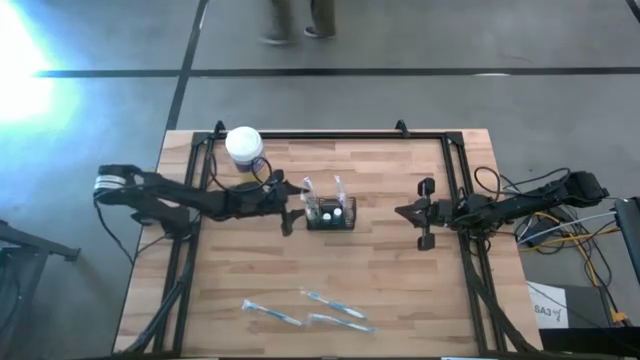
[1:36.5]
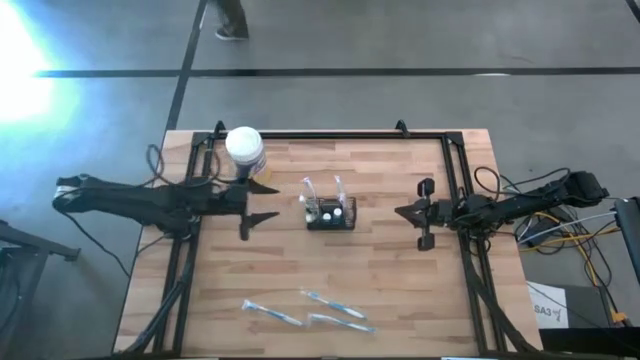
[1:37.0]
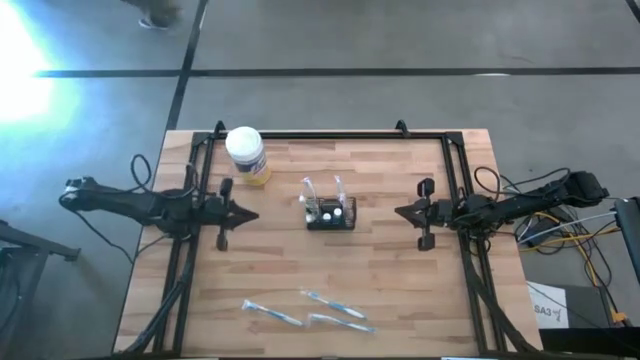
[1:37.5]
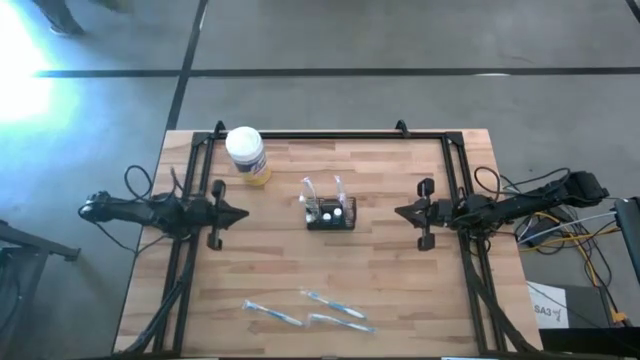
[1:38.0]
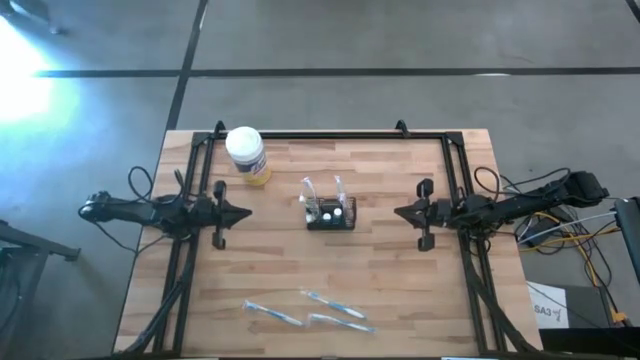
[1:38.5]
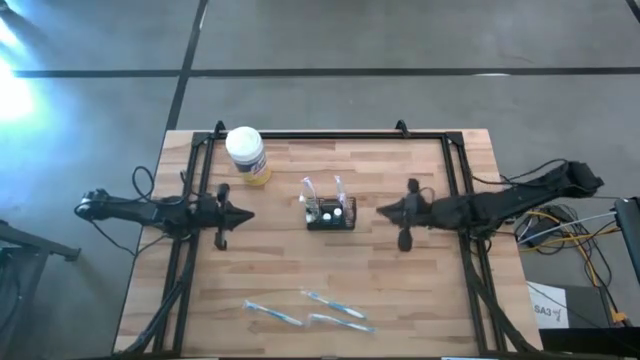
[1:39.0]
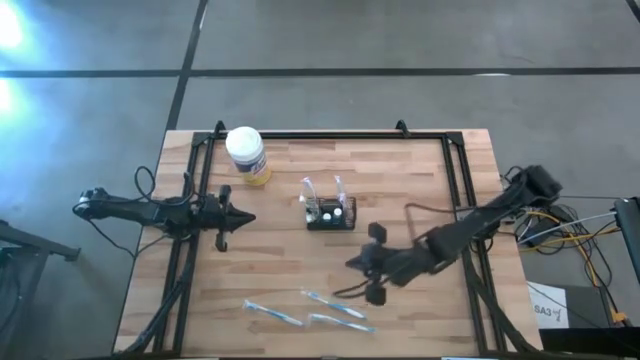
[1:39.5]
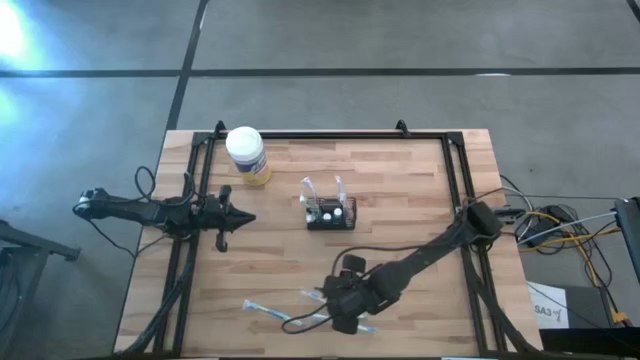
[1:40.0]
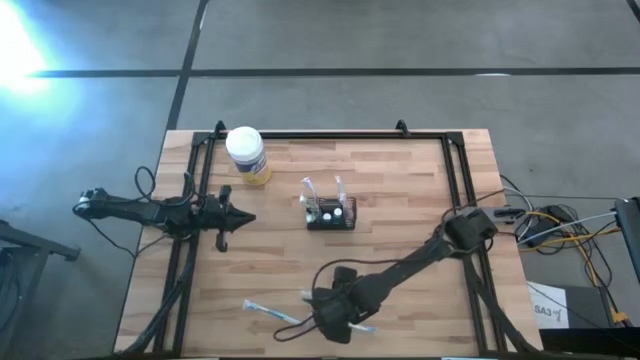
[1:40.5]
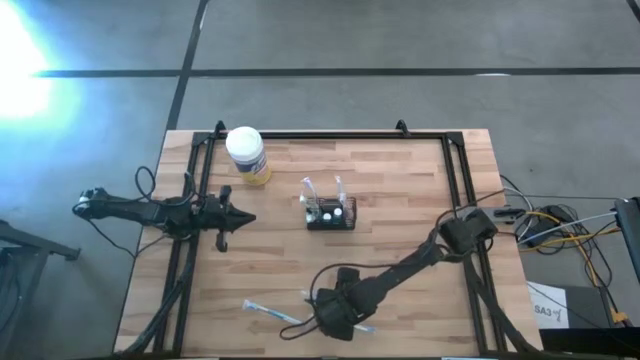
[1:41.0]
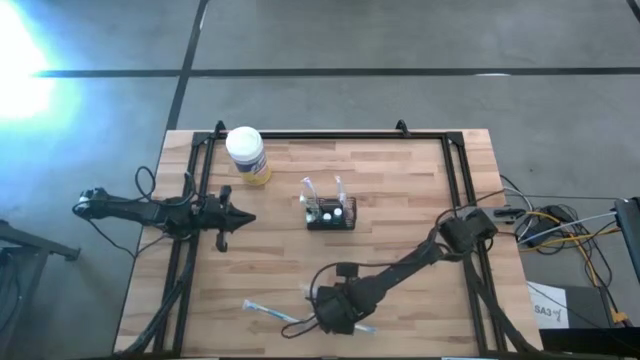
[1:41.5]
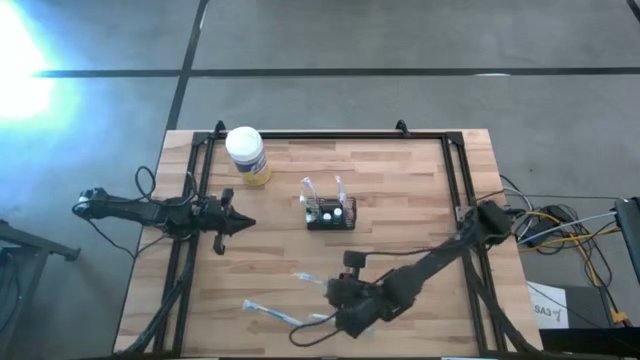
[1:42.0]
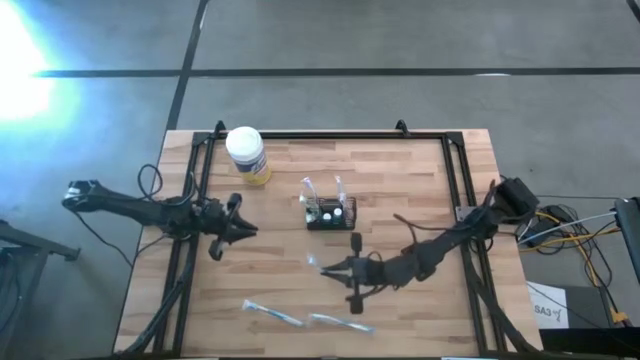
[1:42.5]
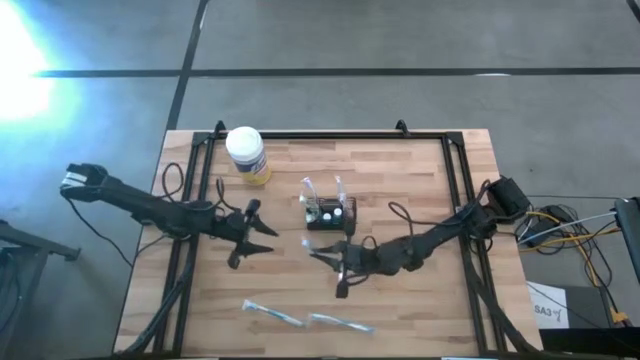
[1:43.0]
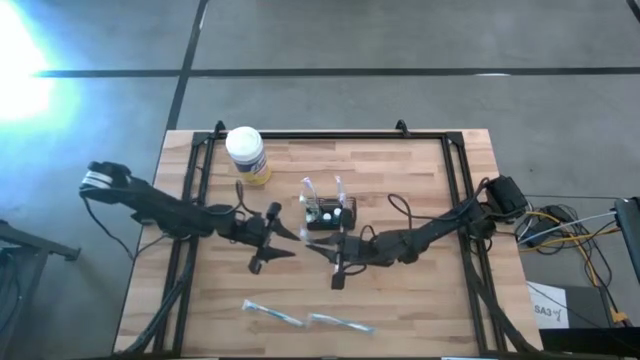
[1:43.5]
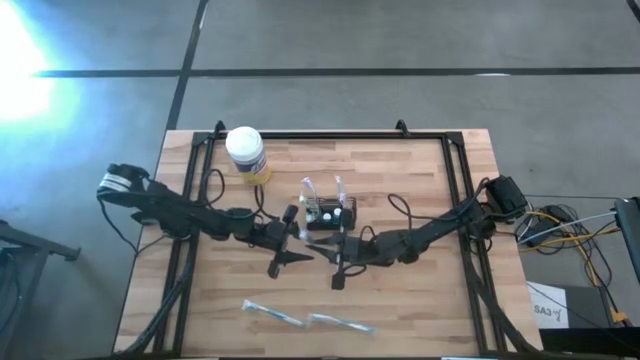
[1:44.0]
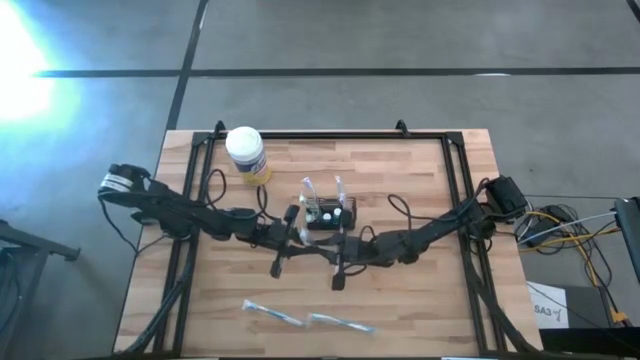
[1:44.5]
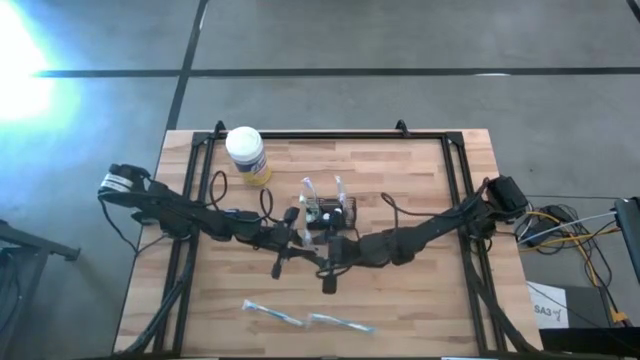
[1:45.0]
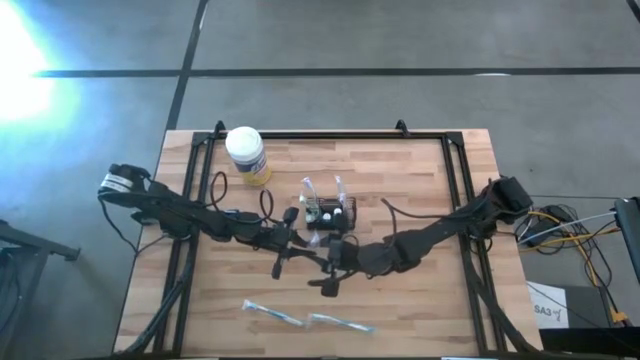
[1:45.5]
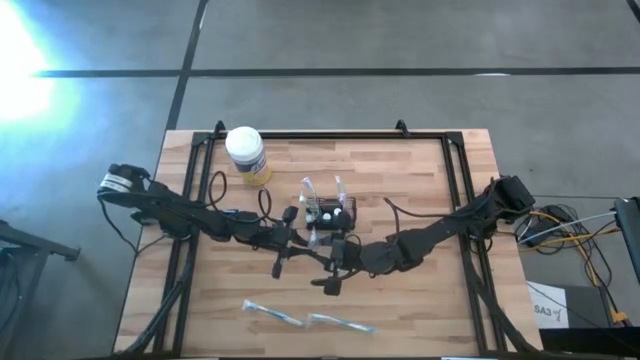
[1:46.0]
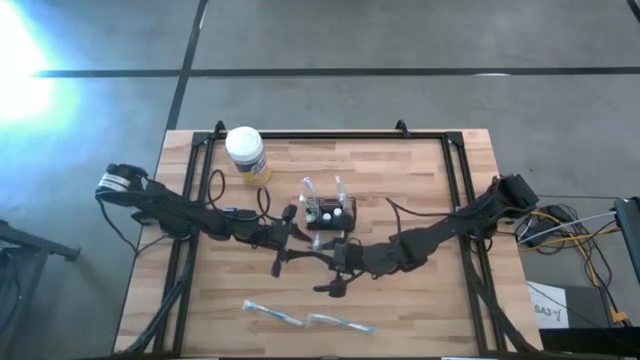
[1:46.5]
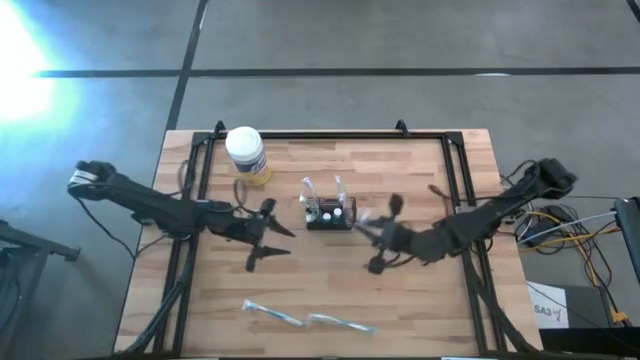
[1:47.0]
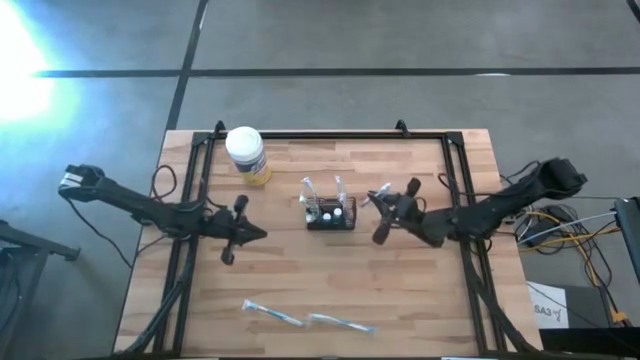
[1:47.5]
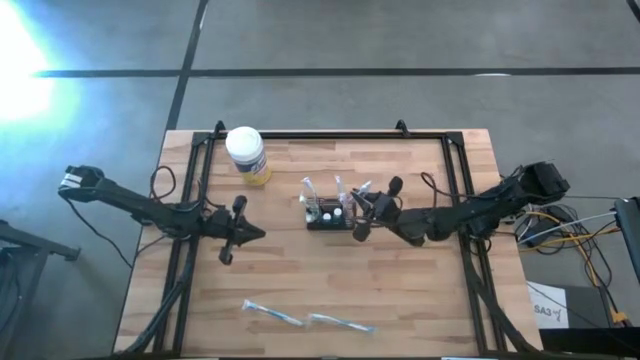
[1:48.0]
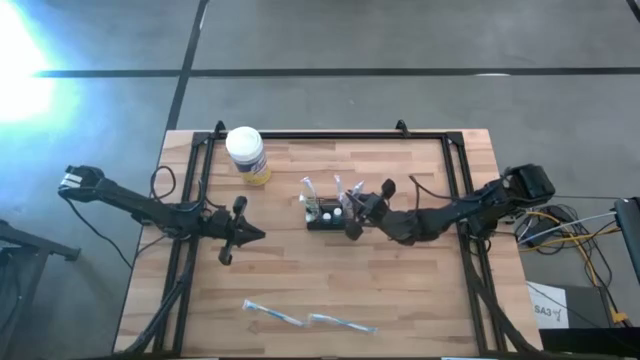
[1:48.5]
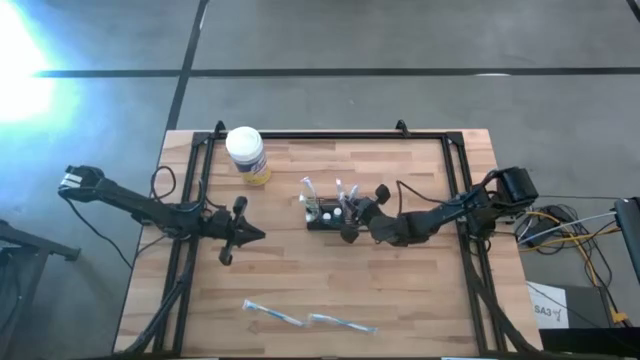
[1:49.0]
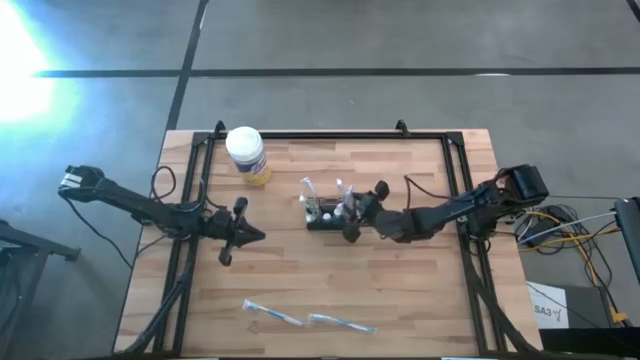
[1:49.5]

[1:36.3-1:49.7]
Task: Pick & Place toothbrushing station
Put the top blue toothbrush into the wire organizer

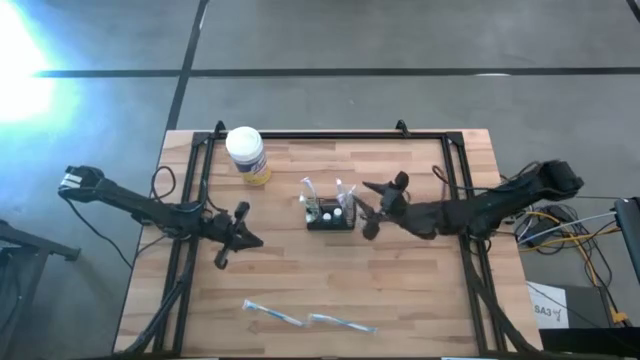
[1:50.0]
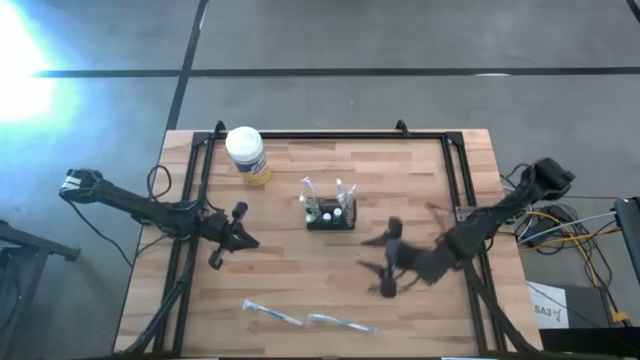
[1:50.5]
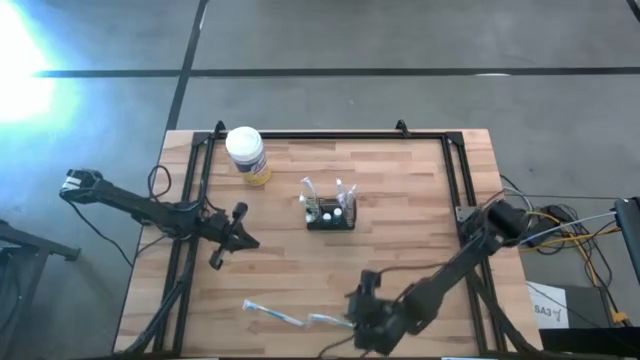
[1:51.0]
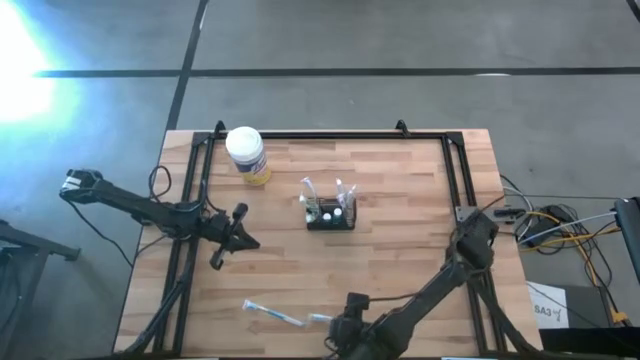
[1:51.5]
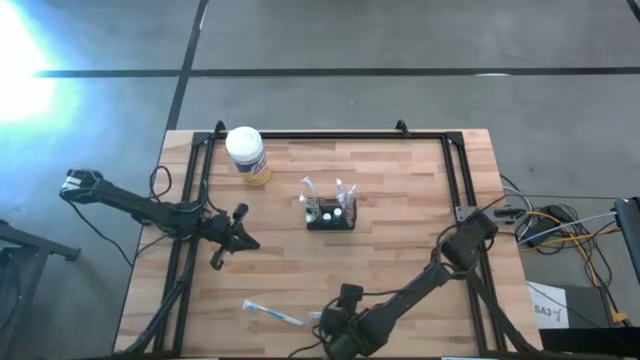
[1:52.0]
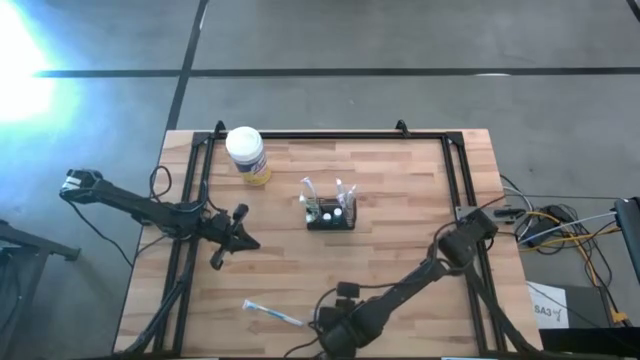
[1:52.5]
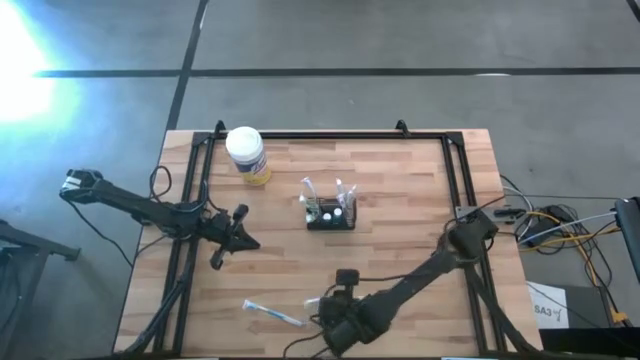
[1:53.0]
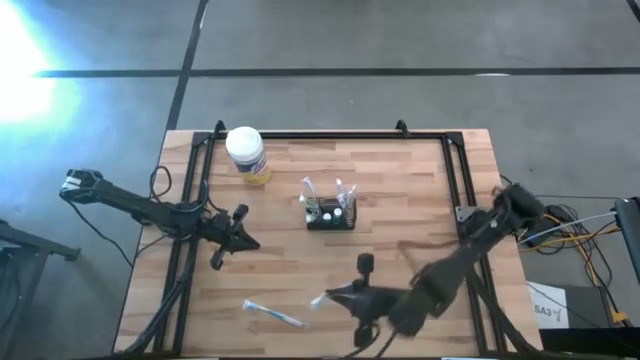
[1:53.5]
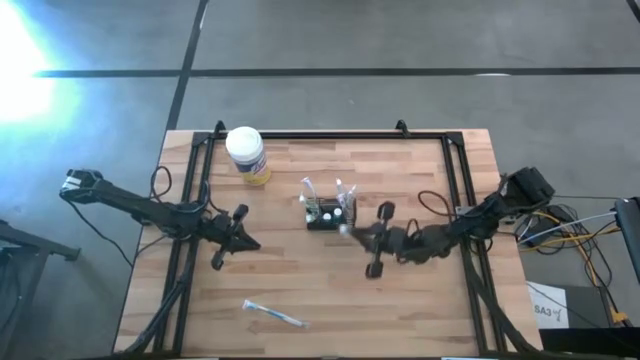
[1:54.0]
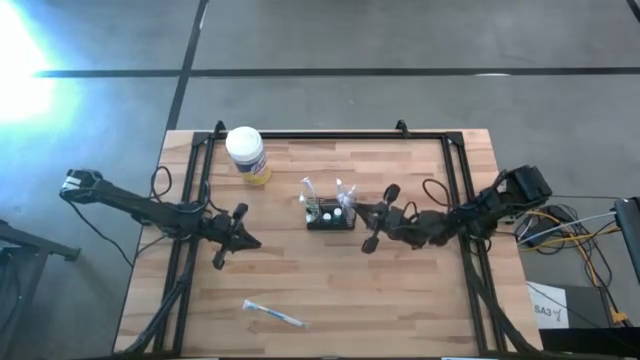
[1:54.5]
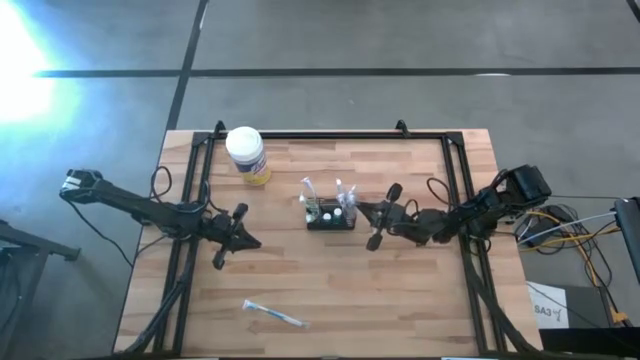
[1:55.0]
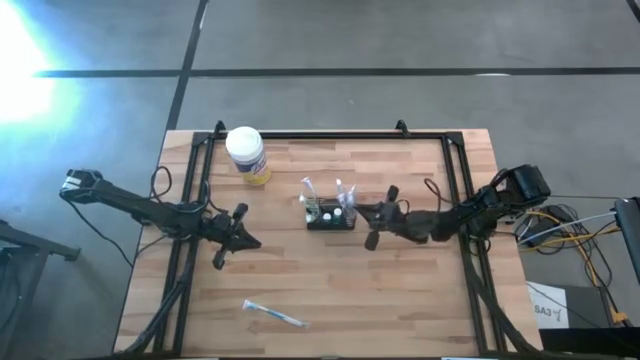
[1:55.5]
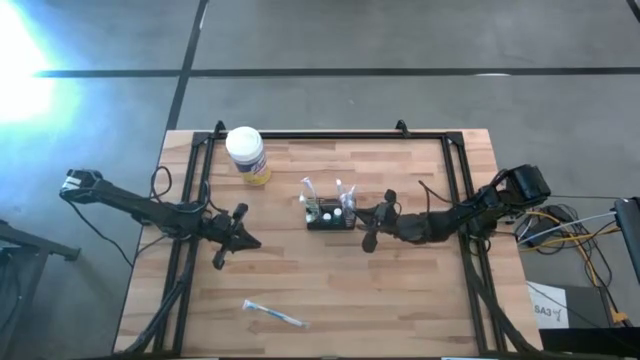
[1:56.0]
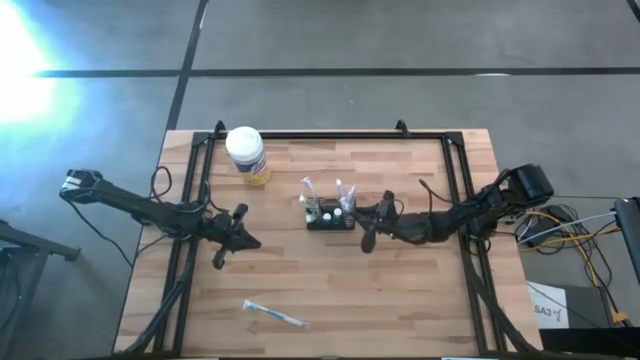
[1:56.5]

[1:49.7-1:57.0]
Put the right blue toothbrush into the wire organizer
